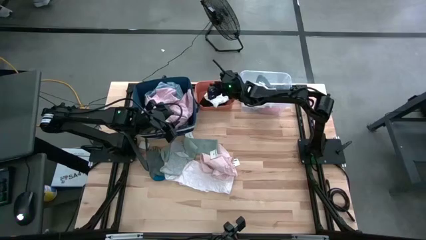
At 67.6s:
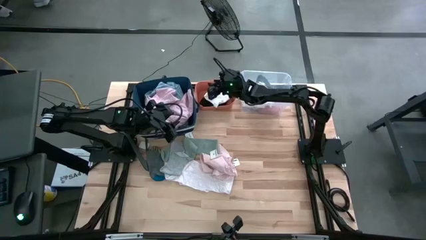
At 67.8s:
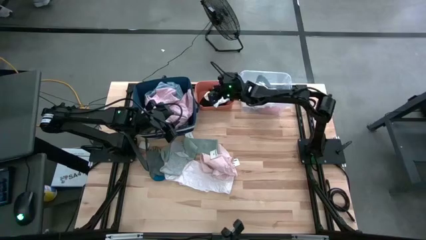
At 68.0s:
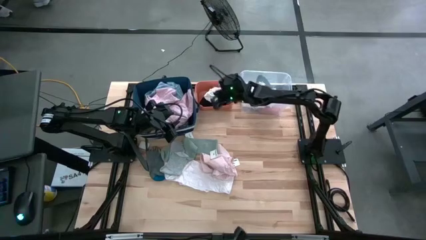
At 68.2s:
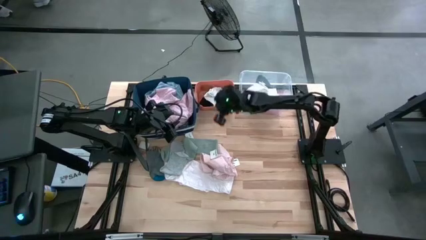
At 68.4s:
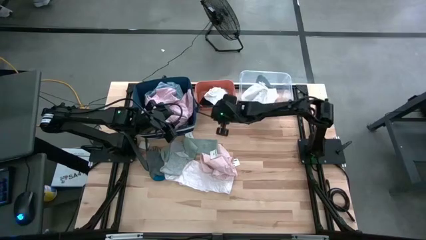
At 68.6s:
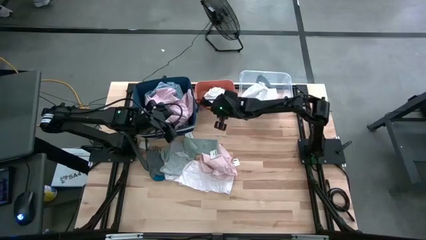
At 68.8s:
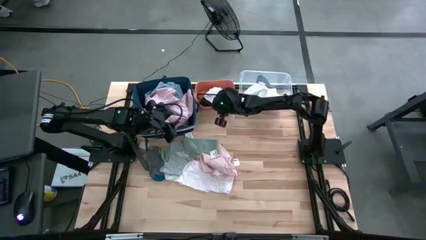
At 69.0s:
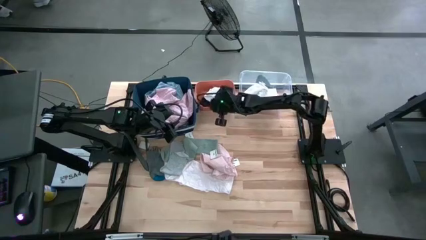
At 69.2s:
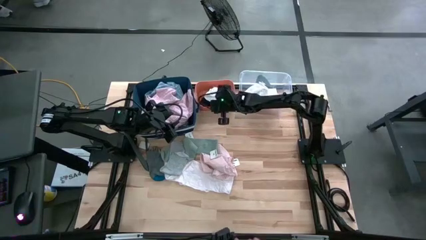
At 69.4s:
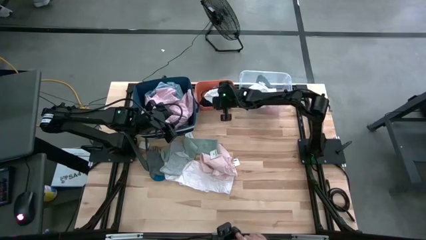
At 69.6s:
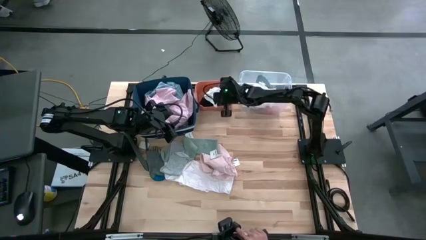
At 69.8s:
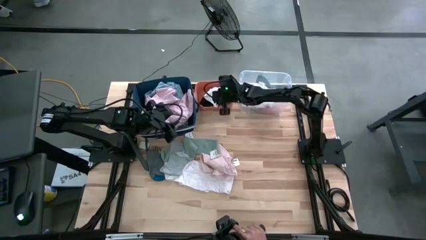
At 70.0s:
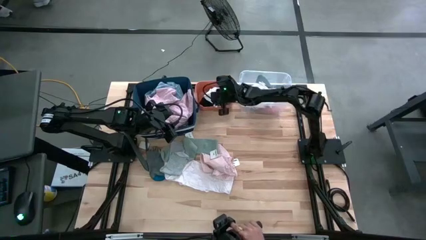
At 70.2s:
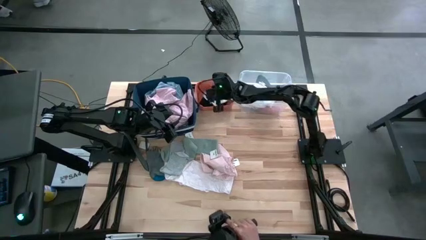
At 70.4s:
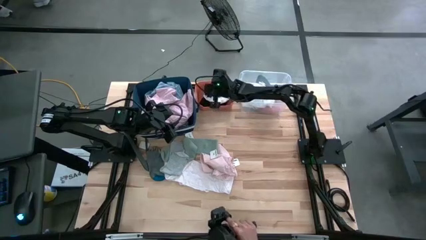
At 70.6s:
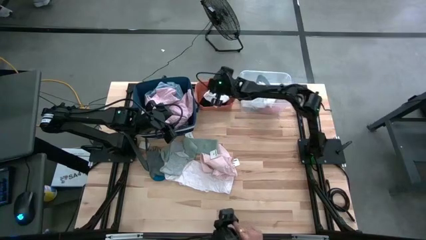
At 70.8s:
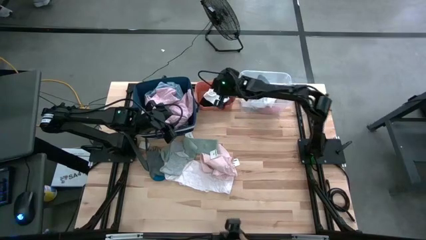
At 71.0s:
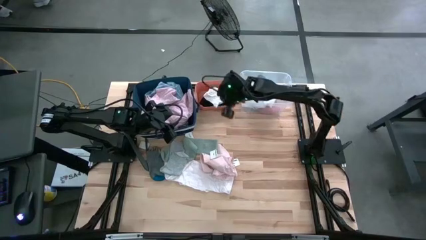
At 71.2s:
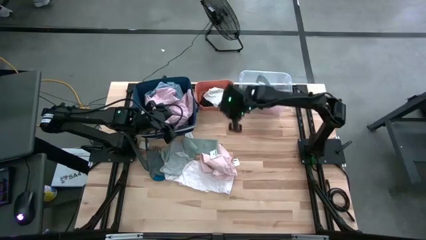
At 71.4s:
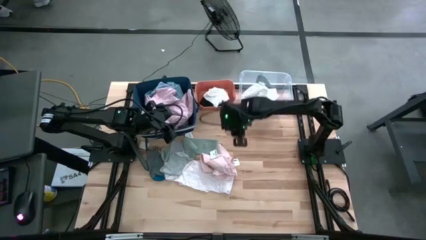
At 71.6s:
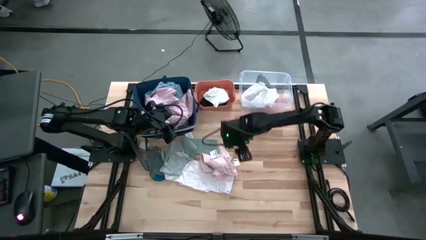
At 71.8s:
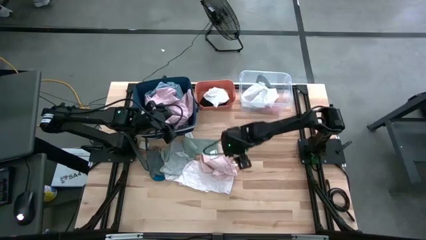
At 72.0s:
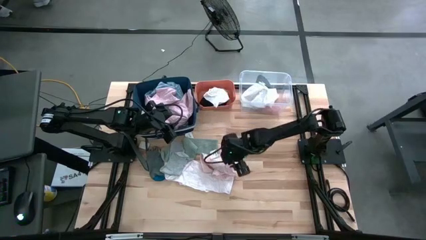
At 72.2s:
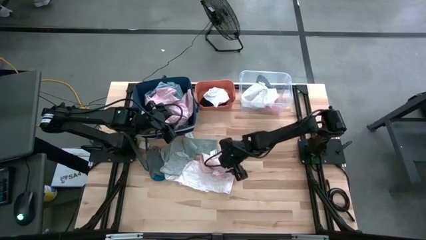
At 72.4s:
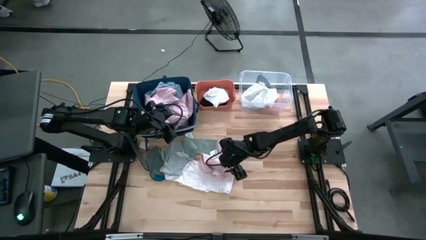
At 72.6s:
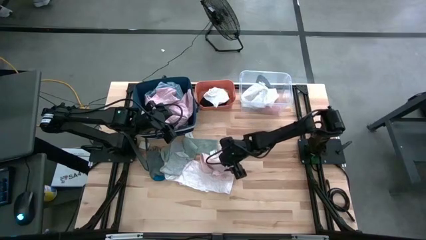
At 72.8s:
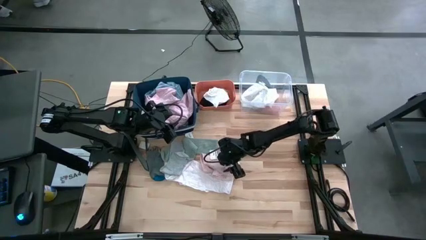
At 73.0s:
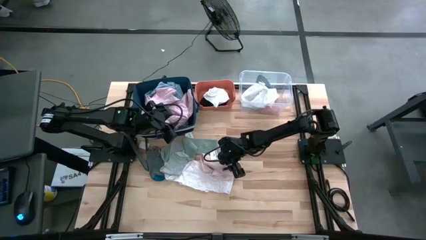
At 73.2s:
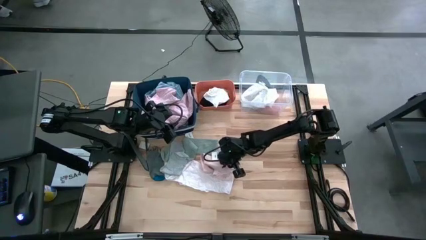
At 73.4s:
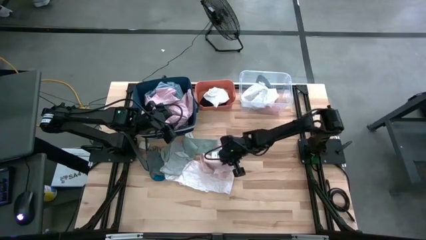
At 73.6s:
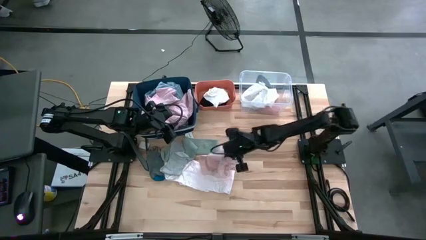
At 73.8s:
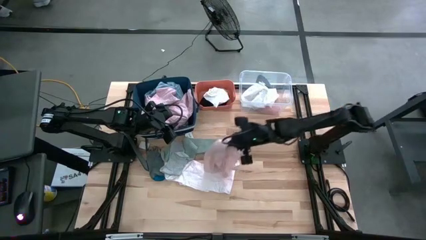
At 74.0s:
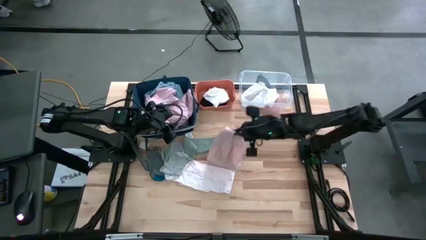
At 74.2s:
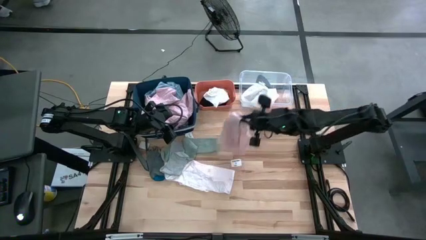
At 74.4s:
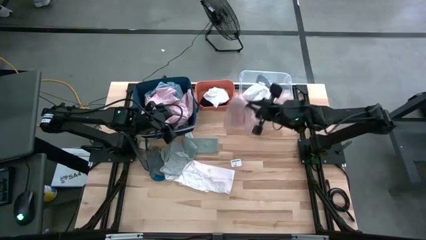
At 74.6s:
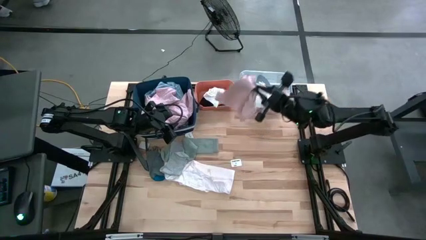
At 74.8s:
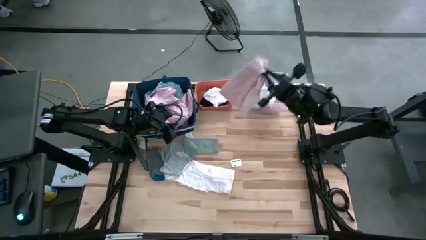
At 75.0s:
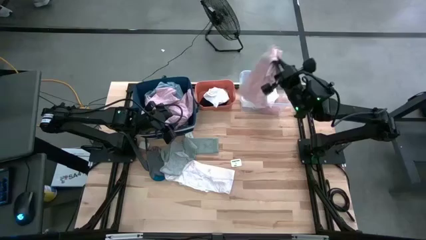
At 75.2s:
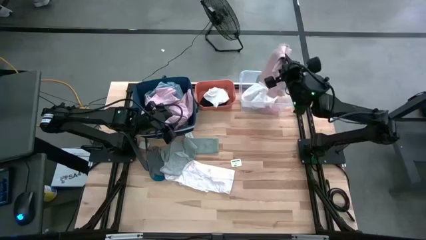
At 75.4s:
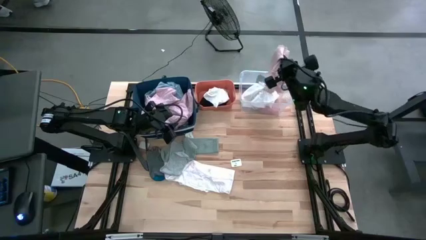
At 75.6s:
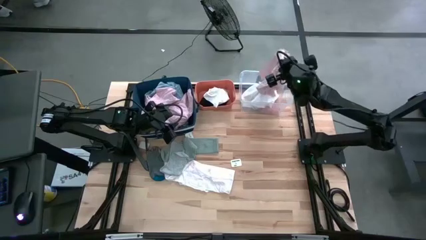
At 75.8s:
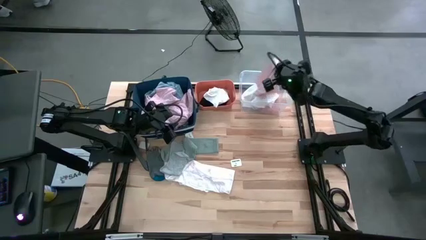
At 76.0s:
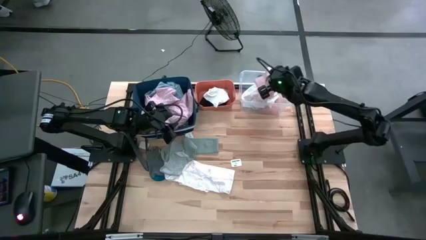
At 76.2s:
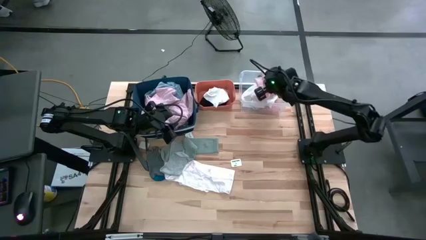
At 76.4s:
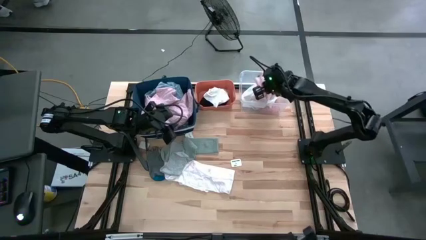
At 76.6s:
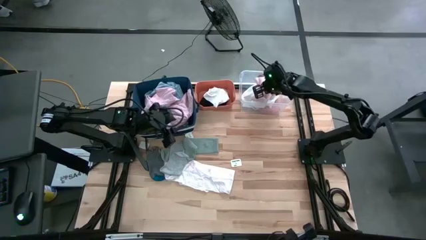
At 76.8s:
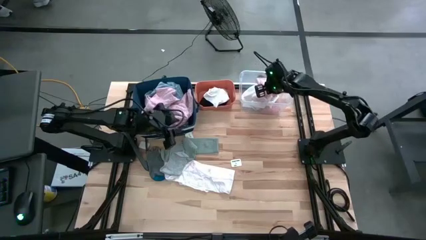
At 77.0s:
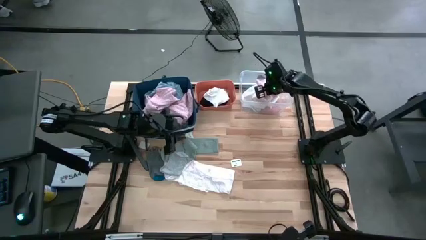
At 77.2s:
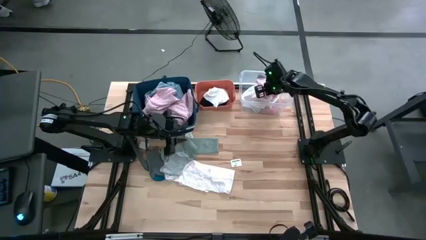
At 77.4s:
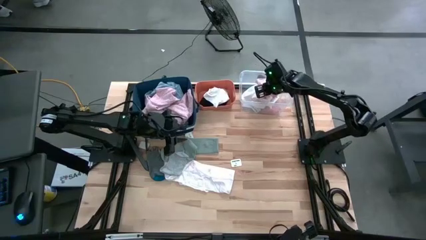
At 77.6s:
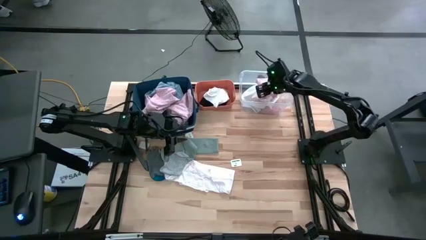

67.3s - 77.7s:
Task: Pick & Place Cloths
Put the light pink underwear into the transparent bin
